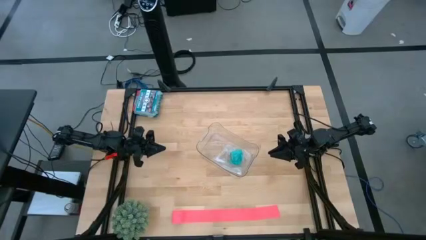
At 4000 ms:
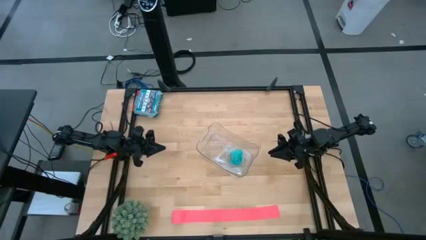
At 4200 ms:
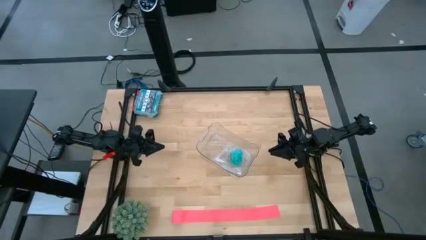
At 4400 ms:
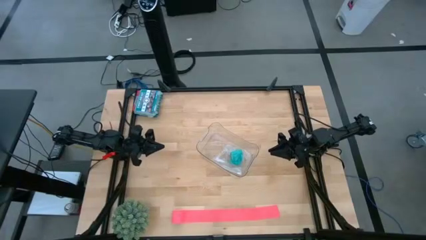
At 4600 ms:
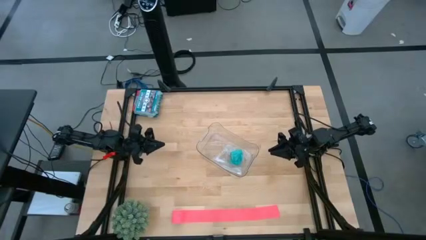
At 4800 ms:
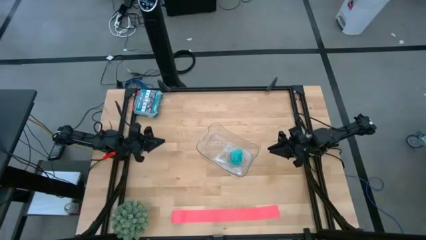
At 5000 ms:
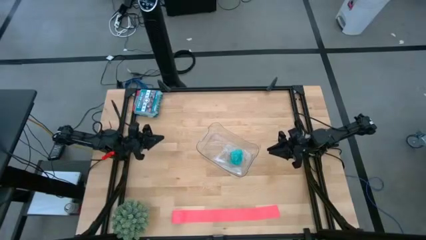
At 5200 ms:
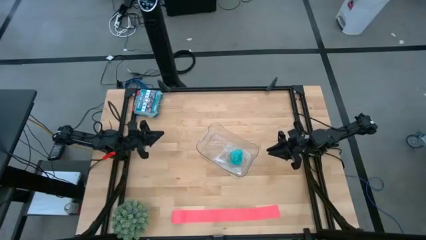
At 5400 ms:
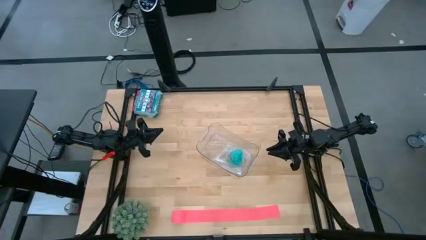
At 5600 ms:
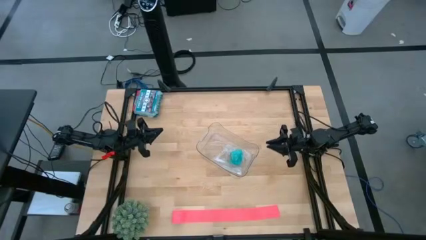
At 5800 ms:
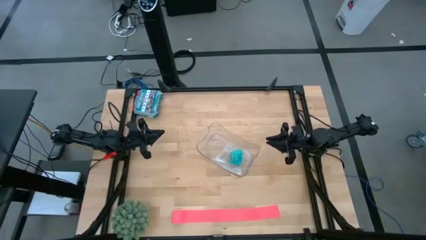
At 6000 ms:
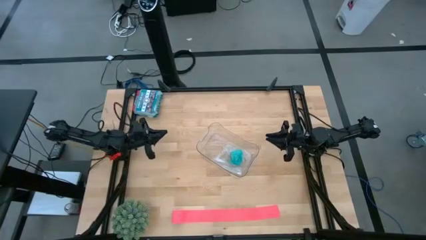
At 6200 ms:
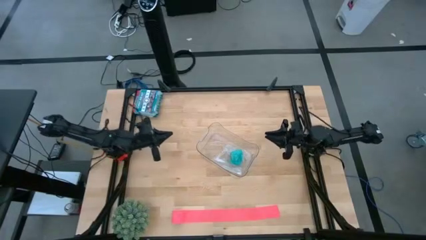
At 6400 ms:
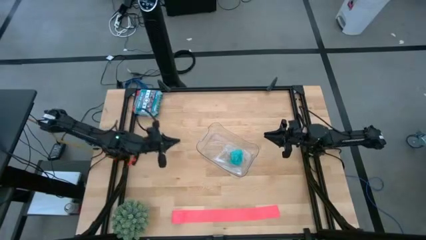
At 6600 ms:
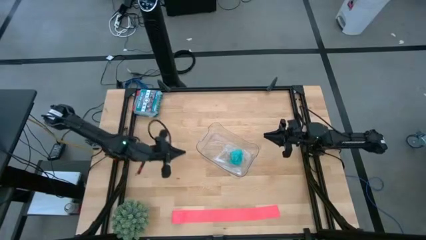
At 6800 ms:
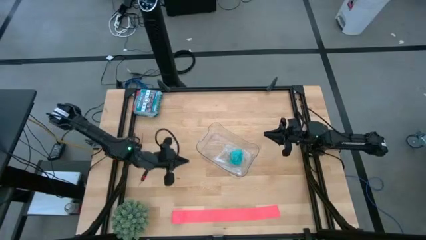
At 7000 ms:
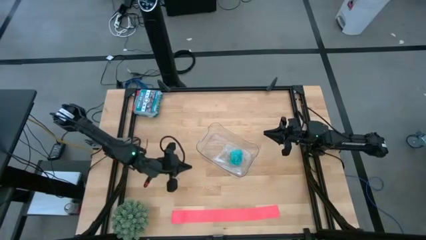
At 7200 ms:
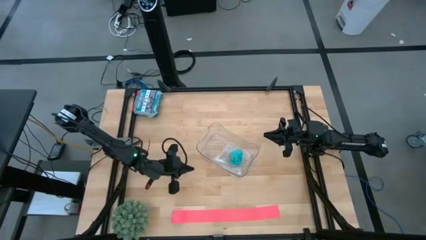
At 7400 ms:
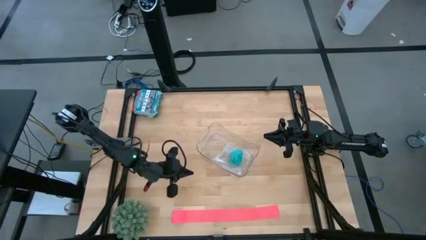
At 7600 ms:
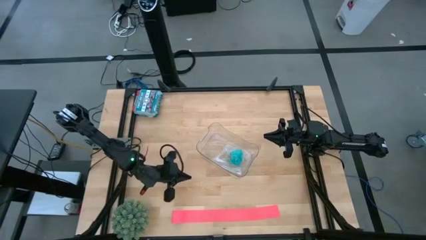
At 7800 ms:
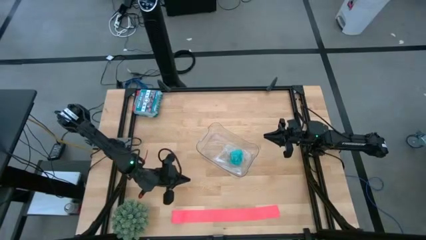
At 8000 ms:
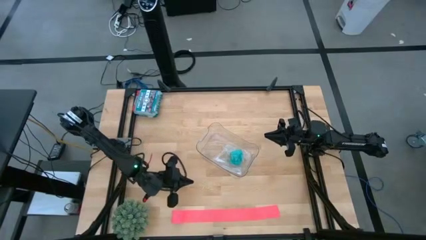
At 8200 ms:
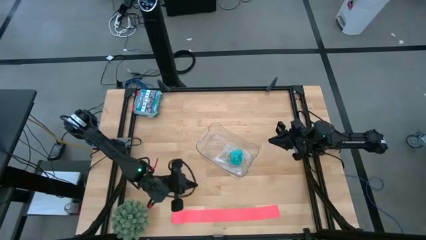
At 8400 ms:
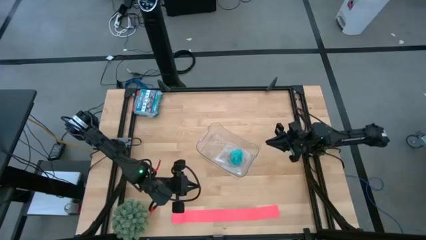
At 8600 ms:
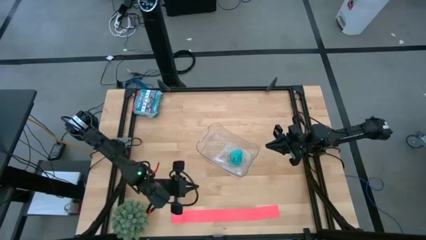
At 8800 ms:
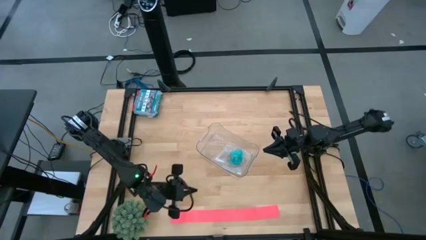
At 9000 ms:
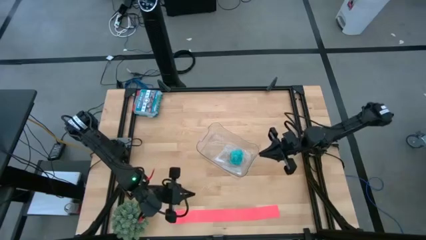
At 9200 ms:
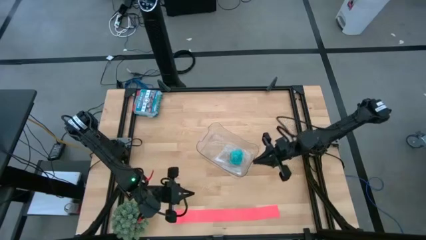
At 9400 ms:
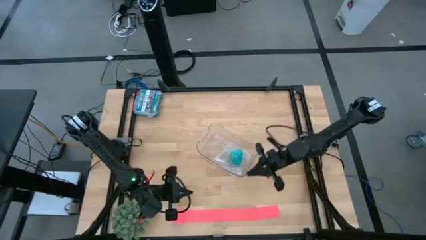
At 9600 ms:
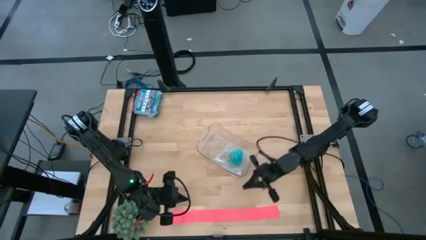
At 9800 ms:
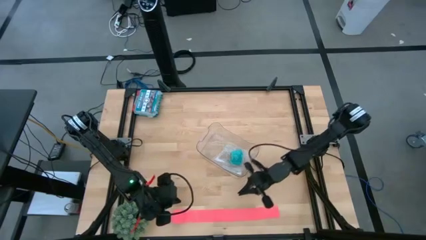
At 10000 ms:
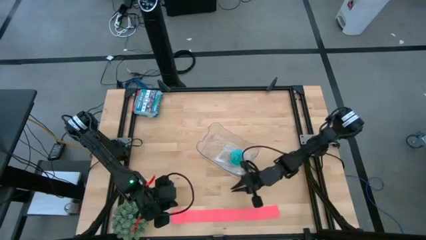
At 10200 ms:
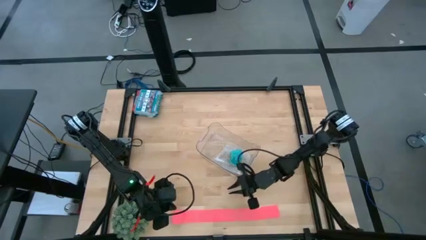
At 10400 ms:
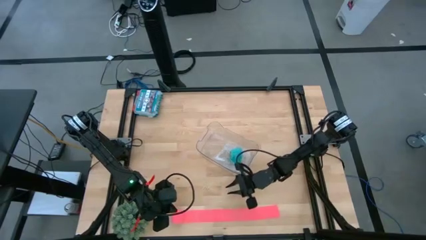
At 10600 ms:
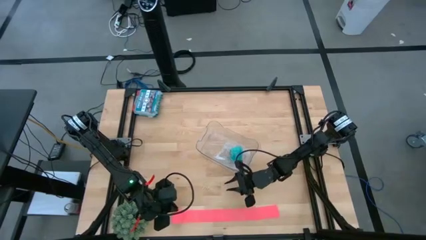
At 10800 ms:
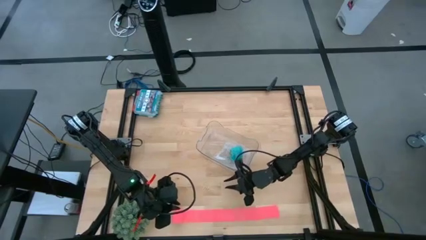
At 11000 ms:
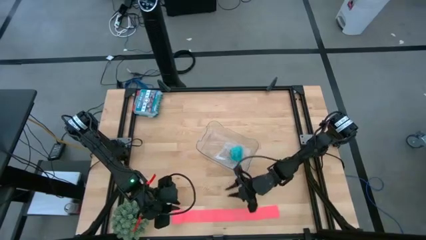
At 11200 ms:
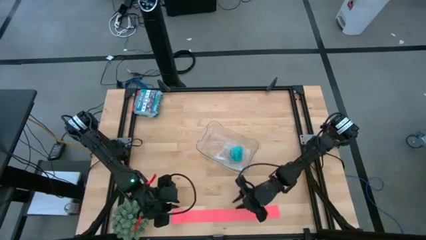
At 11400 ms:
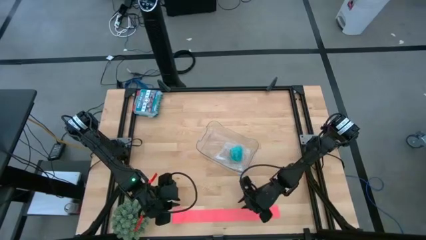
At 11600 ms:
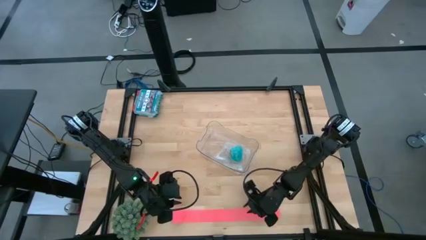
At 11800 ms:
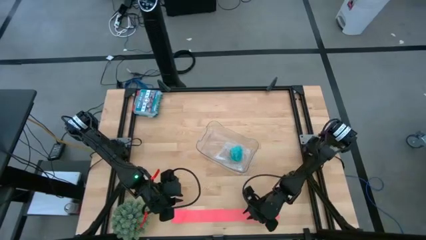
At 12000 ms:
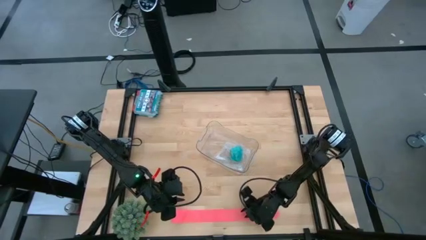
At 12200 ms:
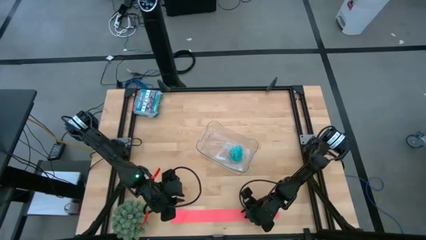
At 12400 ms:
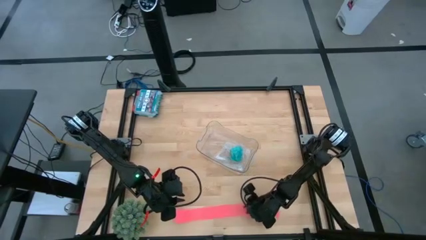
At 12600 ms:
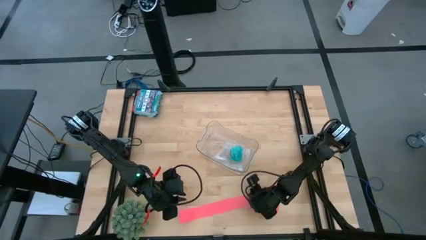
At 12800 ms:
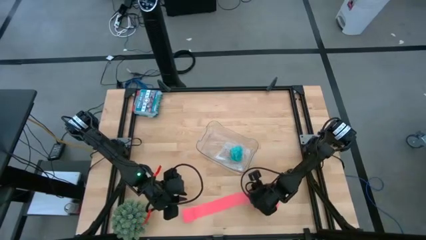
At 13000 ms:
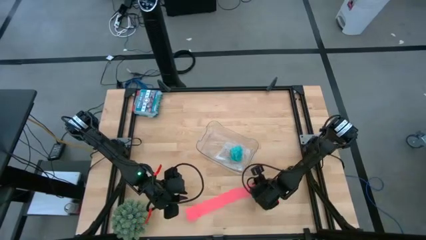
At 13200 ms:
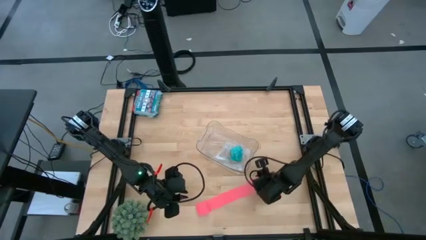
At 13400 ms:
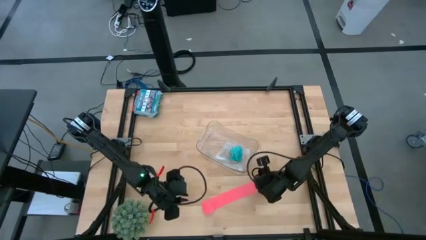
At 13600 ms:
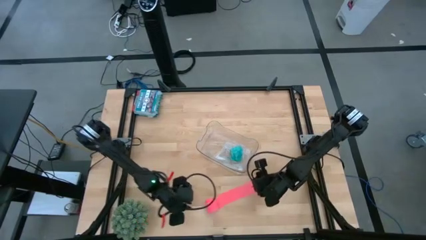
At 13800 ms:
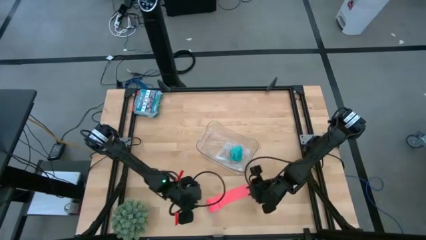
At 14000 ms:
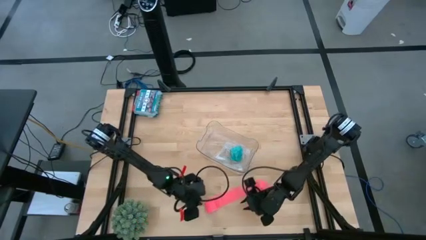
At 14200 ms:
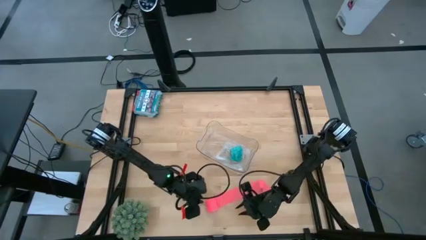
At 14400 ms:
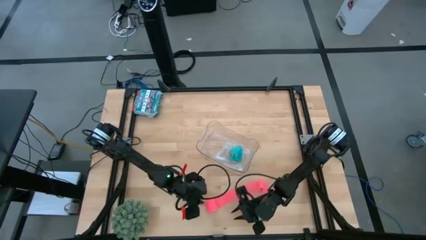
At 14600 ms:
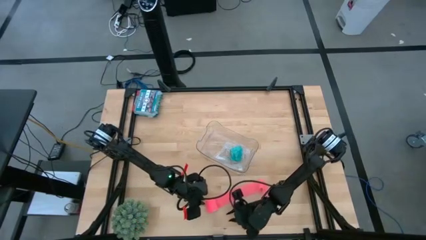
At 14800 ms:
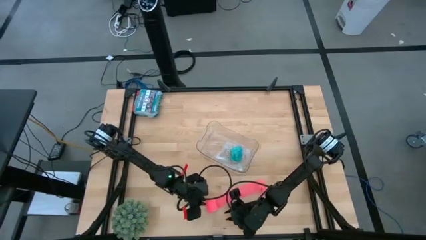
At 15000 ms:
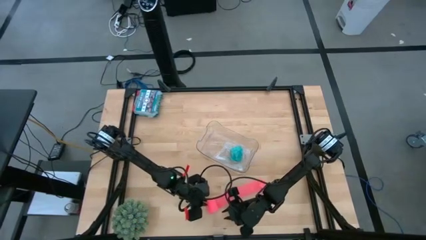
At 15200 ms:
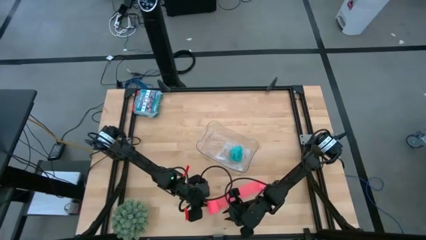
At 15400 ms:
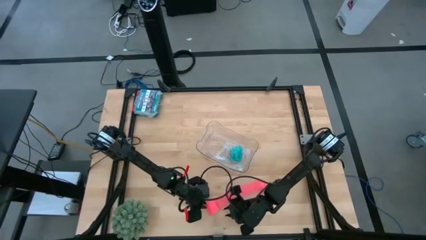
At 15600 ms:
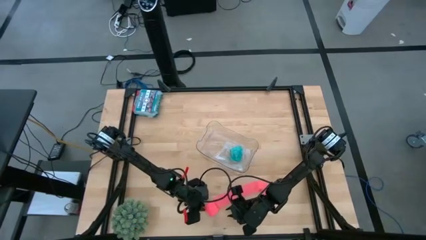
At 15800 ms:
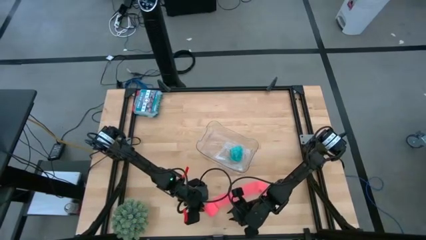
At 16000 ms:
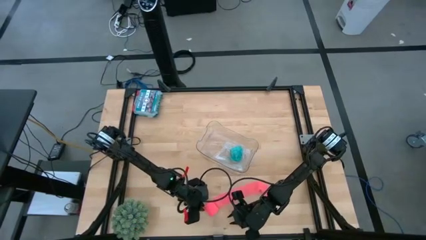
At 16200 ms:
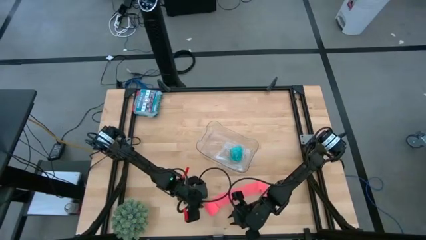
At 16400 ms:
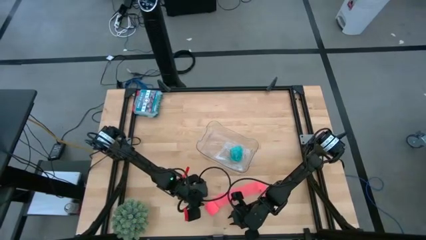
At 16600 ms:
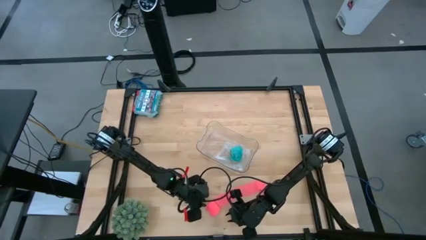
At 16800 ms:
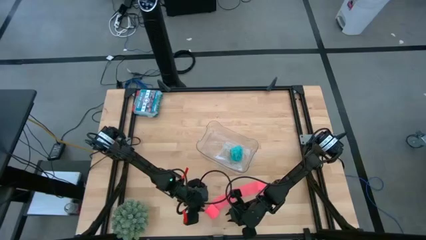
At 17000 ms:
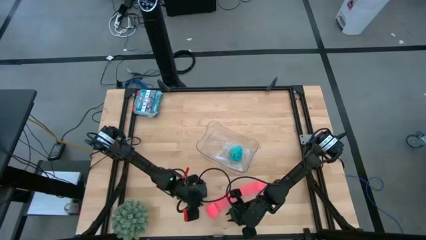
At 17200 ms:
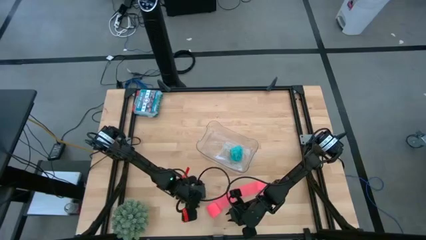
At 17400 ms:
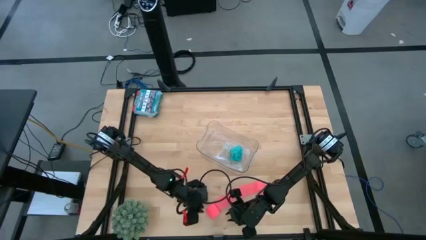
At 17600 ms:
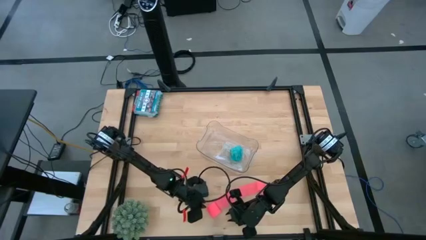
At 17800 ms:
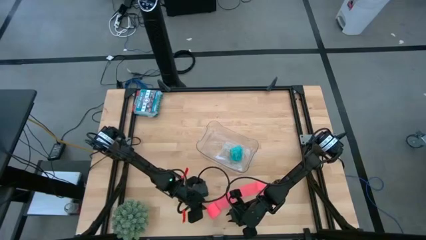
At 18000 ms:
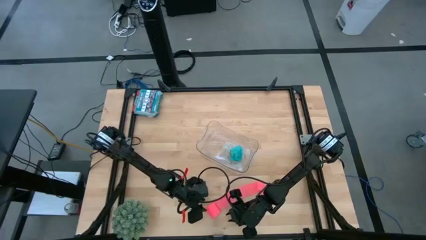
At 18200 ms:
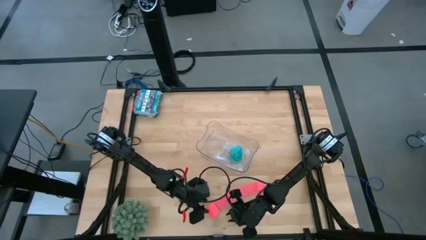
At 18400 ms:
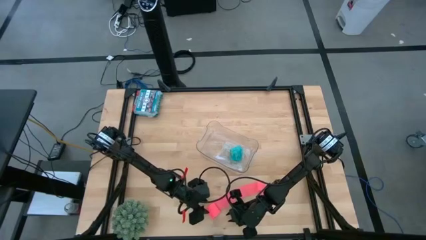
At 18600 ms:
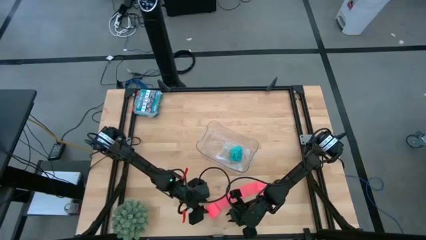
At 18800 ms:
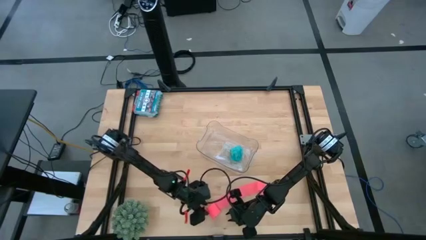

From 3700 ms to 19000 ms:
Task: Roll bandage
Roll the pink bandage
